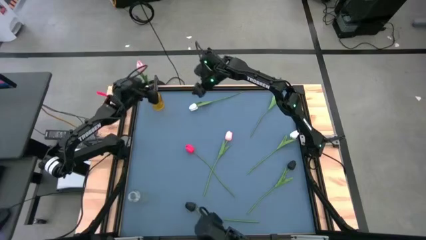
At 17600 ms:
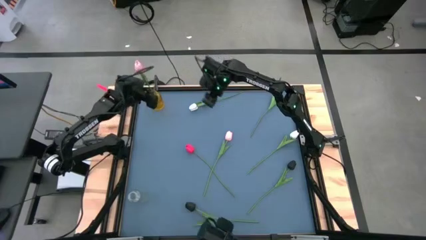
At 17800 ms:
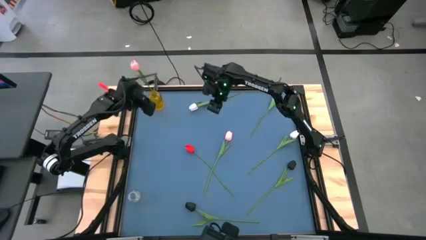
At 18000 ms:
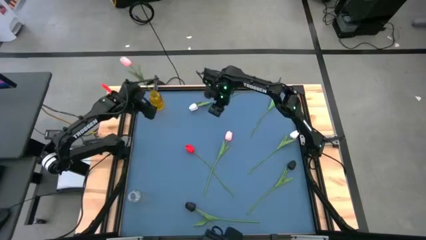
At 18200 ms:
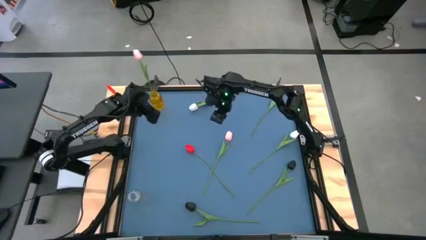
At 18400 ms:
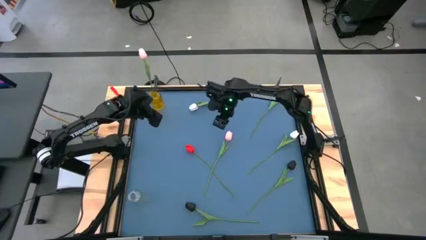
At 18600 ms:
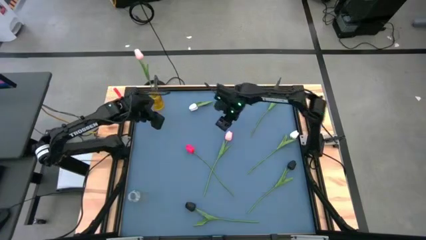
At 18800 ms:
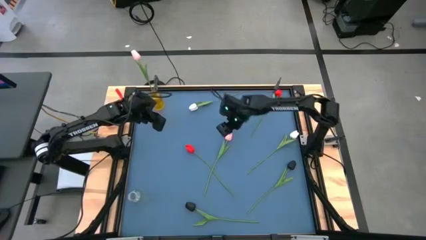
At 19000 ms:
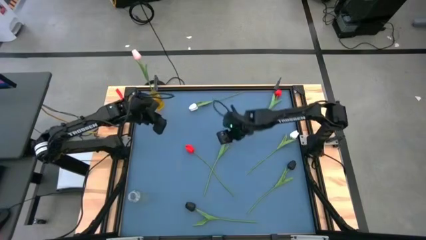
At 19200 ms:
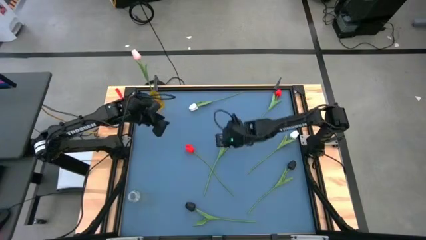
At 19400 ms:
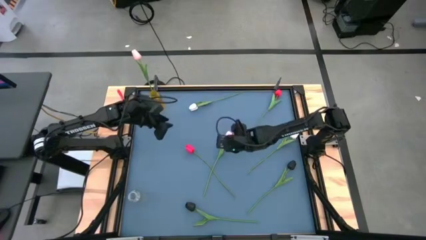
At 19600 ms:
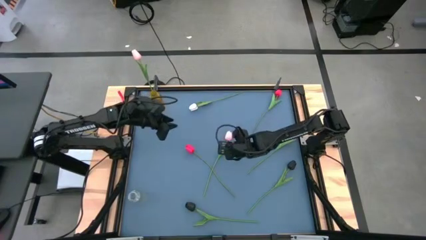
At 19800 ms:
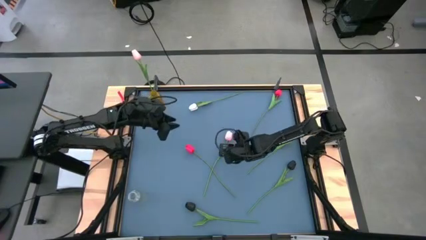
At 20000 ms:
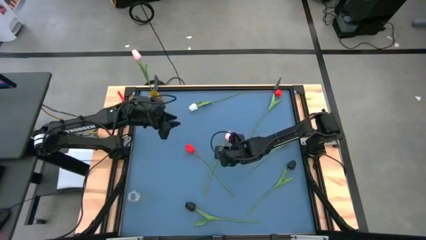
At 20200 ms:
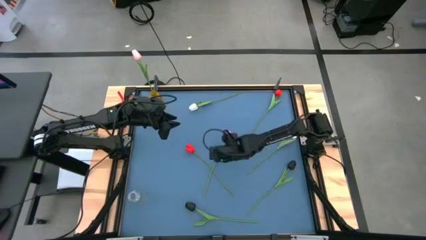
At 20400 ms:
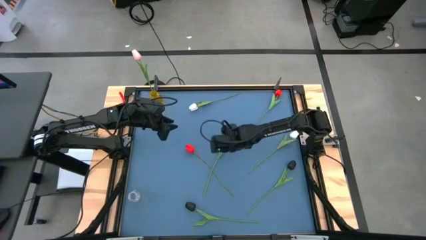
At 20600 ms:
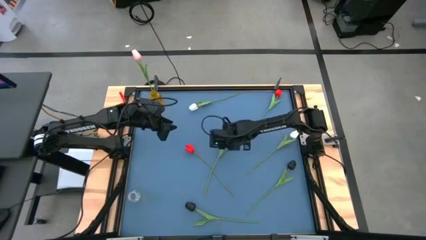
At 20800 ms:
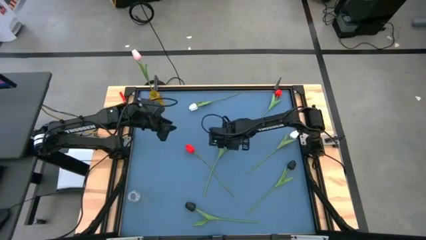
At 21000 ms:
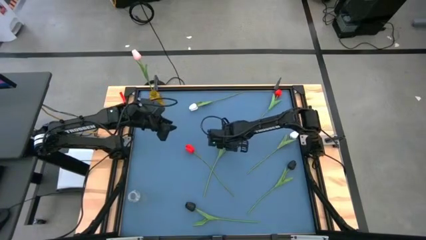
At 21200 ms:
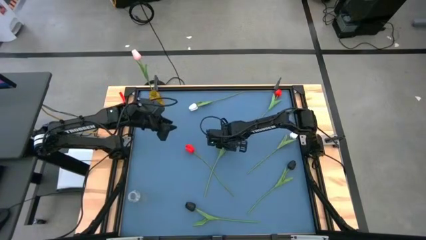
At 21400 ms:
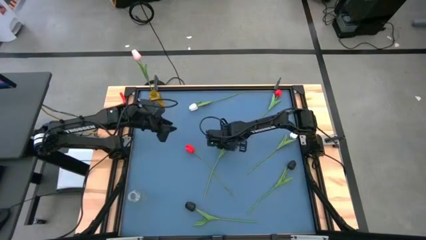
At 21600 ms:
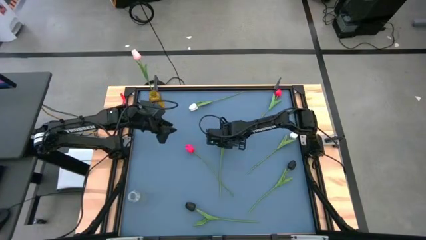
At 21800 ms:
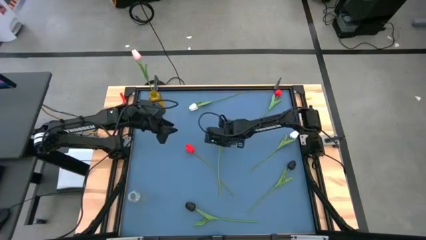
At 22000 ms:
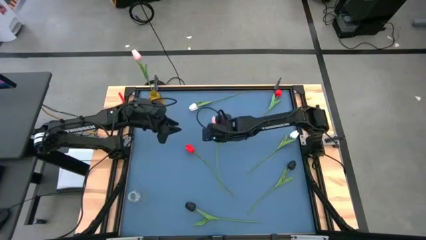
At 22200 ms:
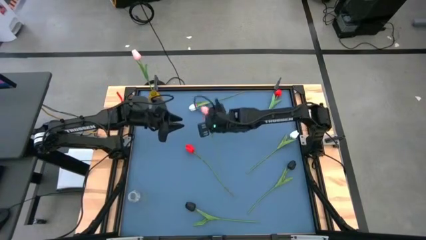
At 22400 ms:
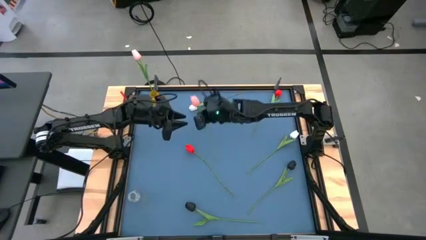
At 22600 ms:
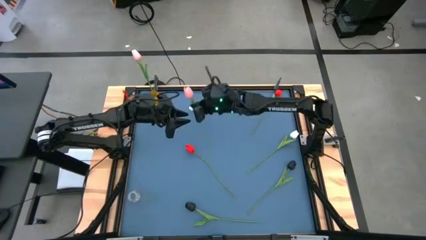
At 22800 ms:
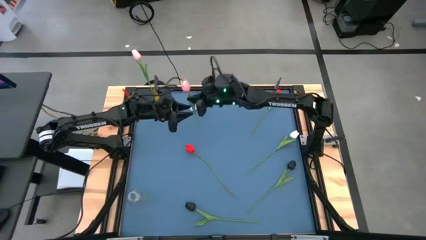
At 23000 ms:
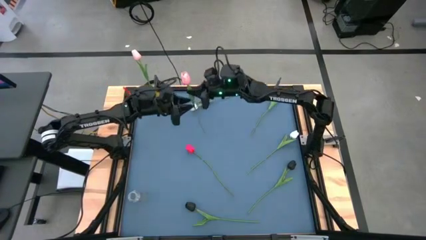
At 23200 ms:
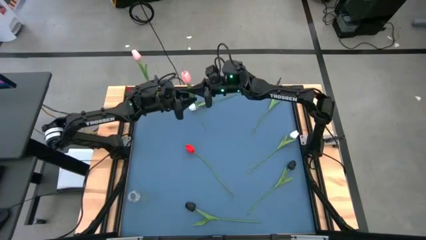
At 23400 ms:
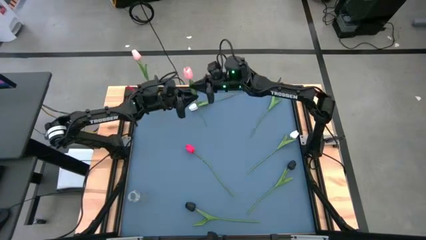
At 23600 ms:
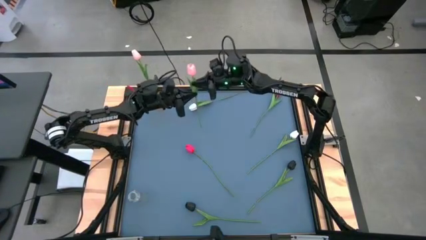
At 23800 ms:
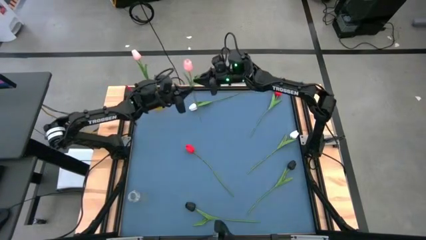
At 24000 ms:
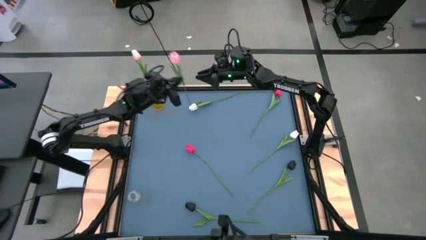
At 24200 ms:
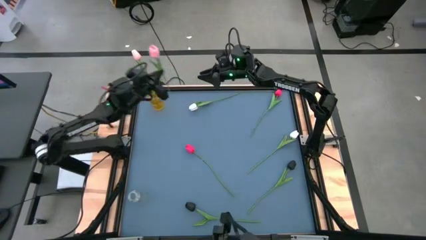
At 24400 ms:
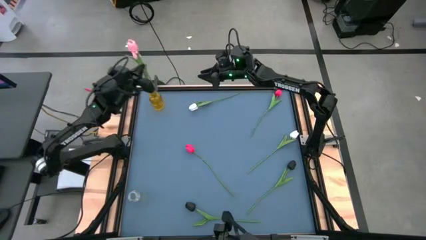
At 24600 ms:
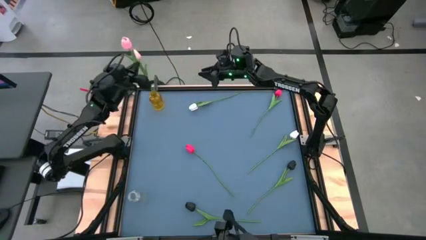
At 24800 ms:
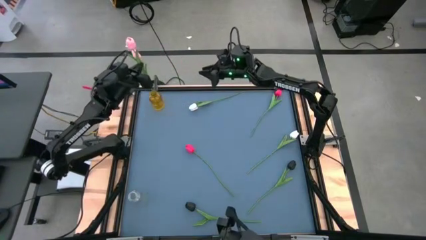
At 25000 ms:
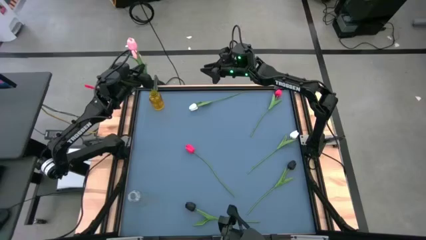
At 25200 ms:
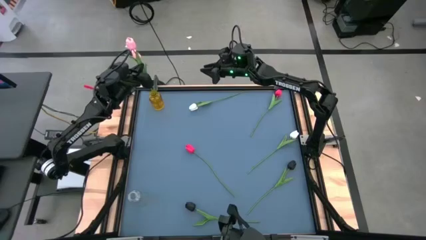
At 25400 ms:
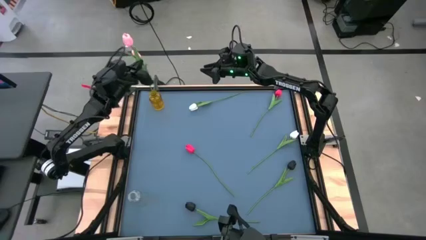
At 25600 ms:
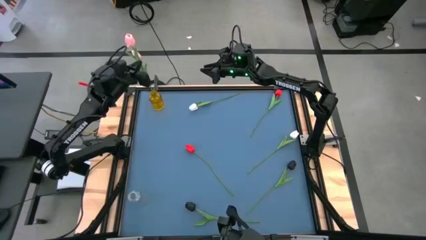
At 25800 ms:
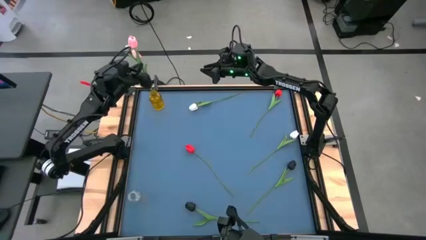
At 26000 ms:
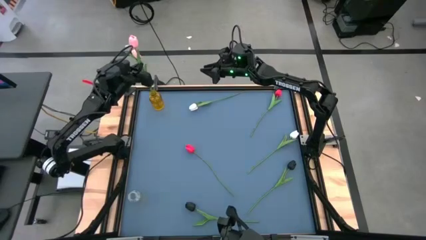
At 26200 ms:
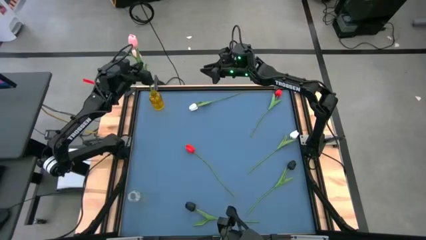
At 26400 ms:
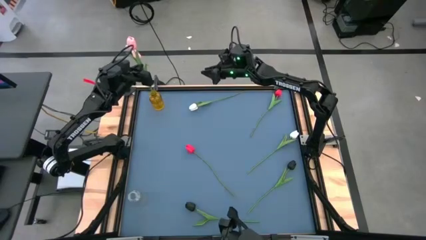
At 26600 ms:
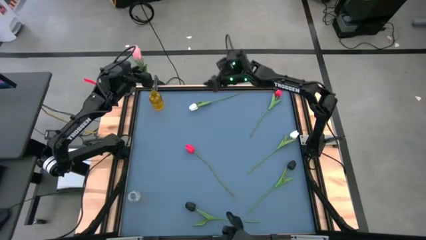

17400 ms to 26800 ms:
Task: Sort flowers into vase by color
Put the pink flower into the yellow vase

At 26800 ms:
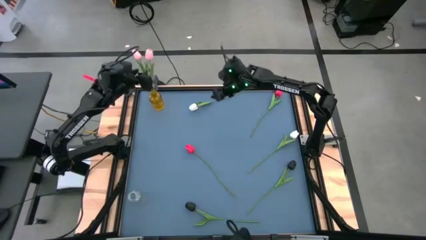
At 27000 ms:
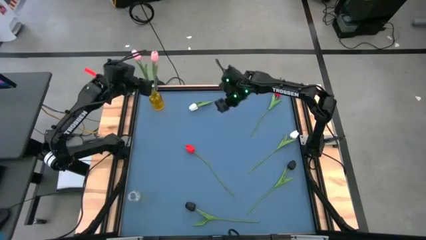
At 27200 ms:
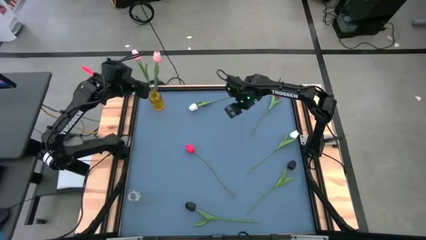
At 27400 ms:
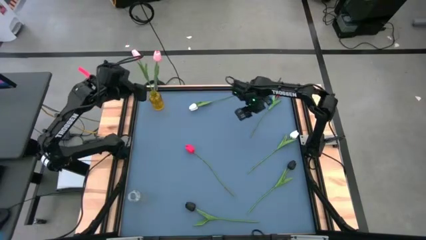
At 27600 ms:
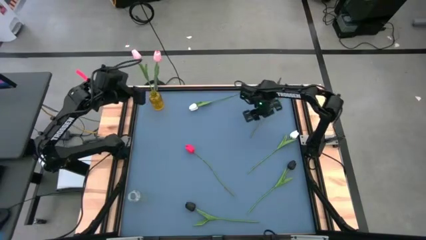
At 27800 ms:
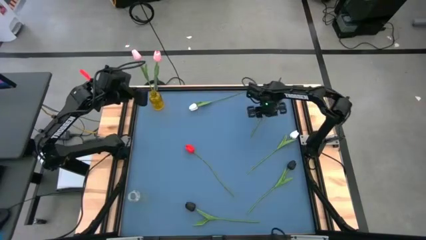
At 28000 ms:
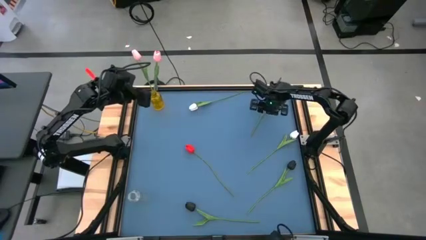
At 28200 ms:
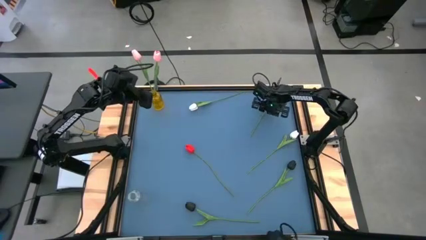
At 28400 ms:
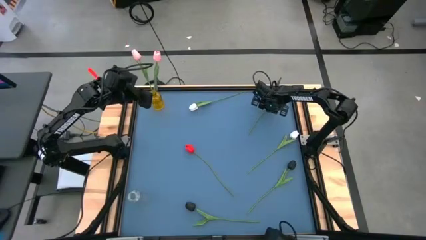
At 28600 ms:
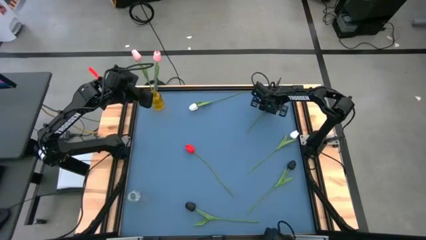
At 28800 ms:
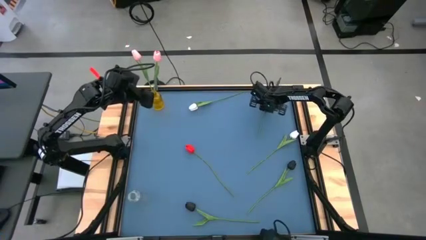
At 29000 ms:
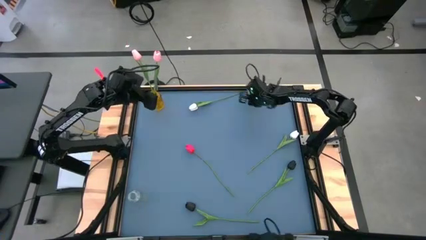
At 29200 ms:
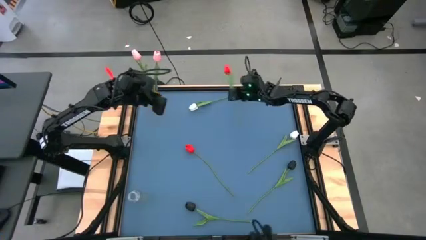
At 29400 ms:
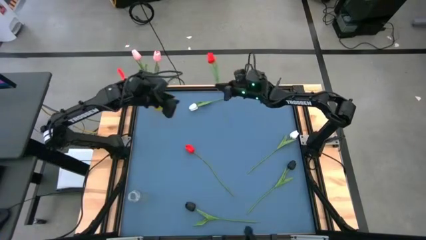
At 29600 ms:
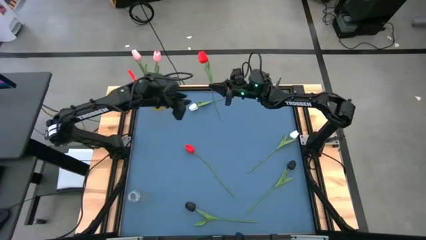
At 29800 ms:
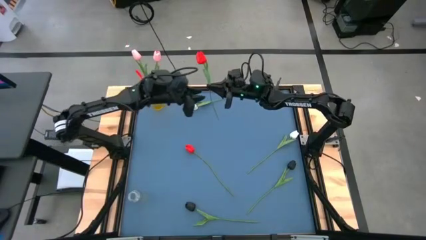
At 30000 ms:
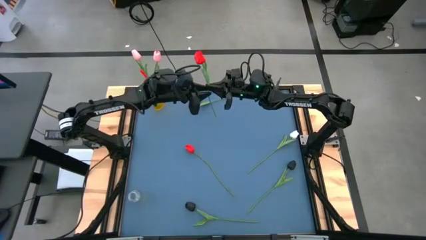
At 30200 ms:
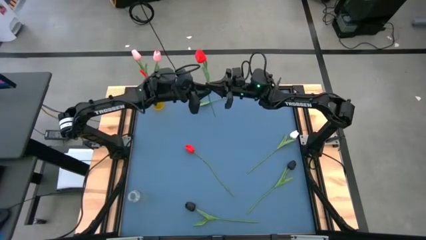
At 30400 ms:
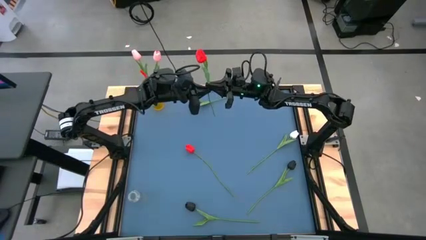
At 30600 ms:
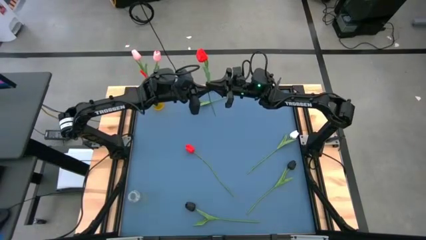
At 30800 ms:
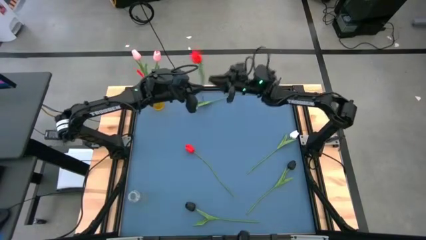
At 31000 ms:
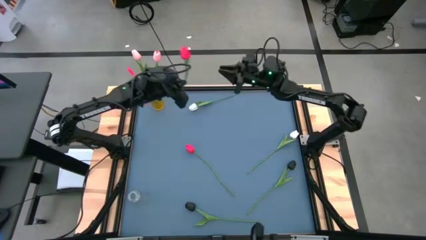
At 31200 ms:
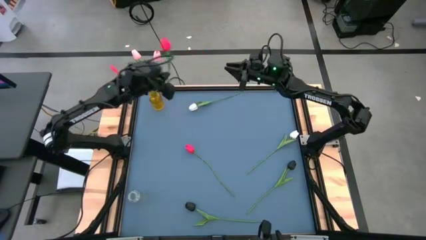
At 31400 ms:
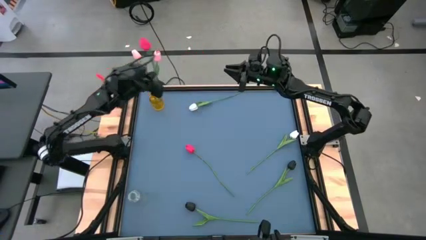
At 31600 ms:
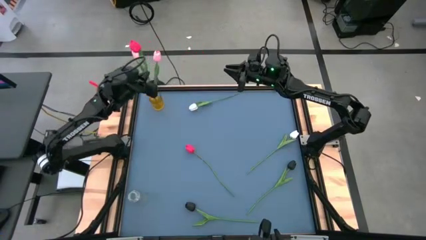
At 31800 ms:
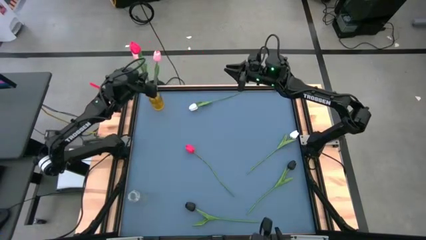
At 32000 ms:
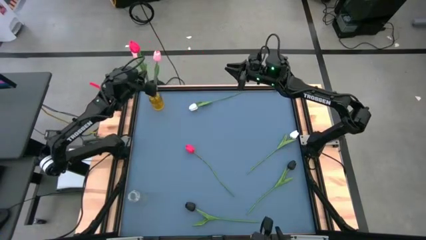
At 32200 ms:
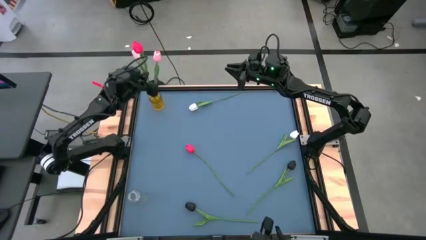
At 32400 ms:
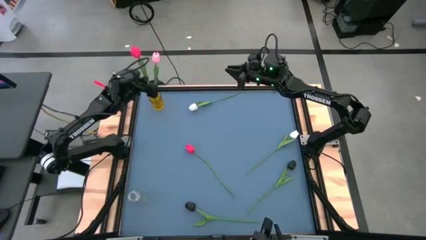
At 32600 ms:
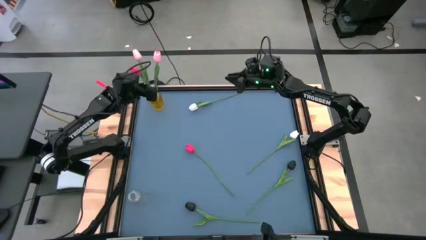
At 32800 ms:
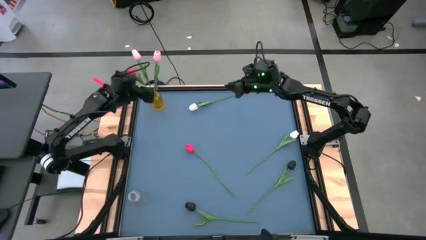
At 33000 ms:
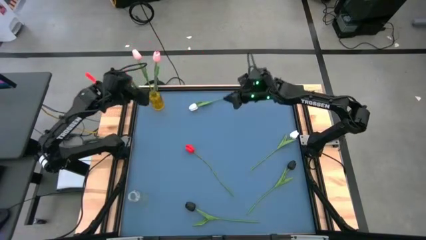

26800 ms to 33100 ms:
Put the top red flower into the yellow vase
